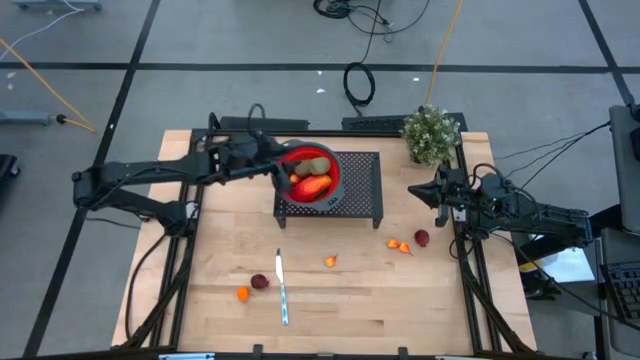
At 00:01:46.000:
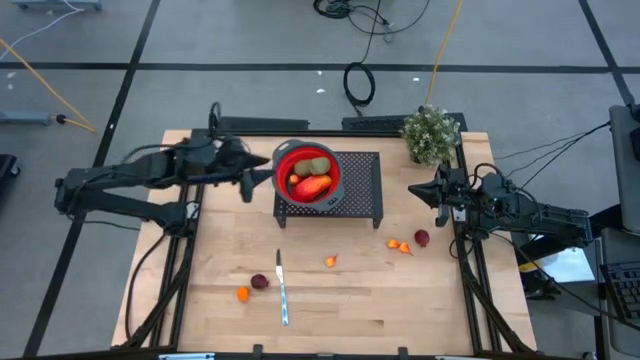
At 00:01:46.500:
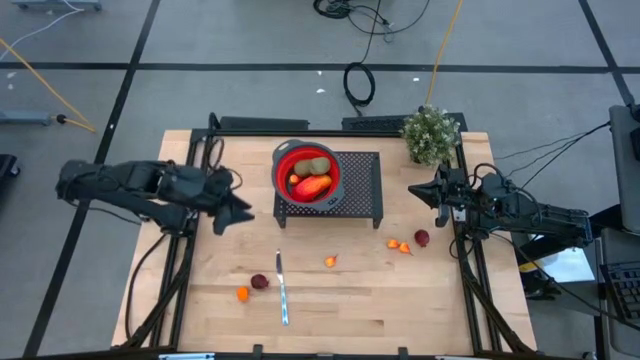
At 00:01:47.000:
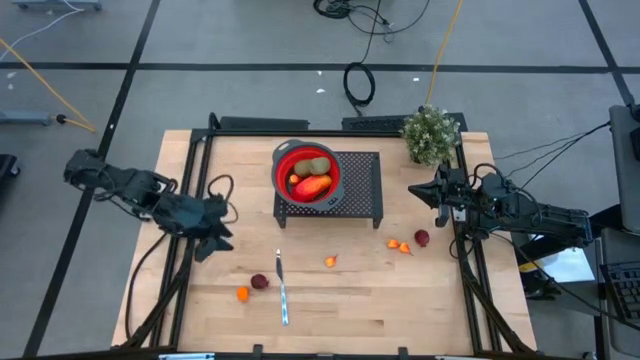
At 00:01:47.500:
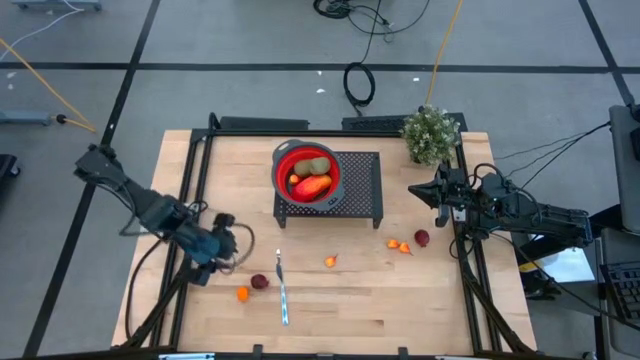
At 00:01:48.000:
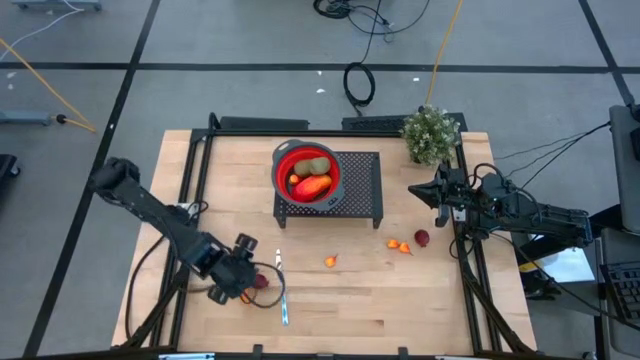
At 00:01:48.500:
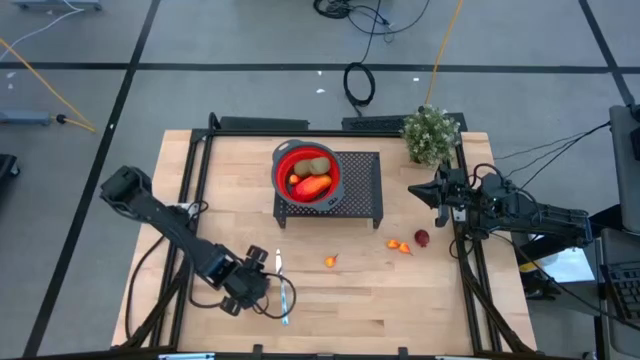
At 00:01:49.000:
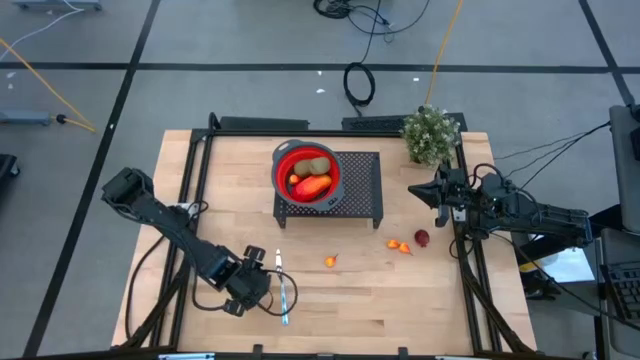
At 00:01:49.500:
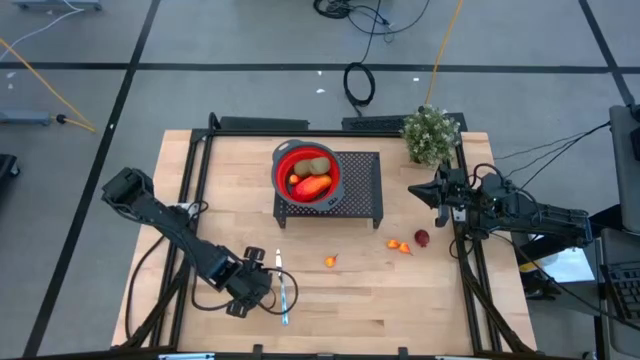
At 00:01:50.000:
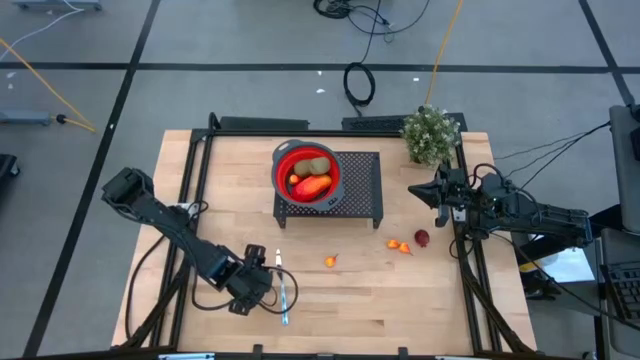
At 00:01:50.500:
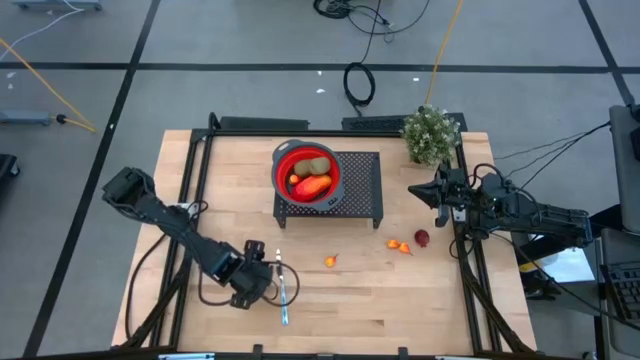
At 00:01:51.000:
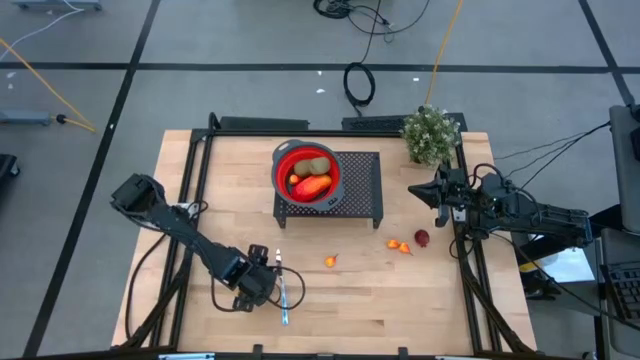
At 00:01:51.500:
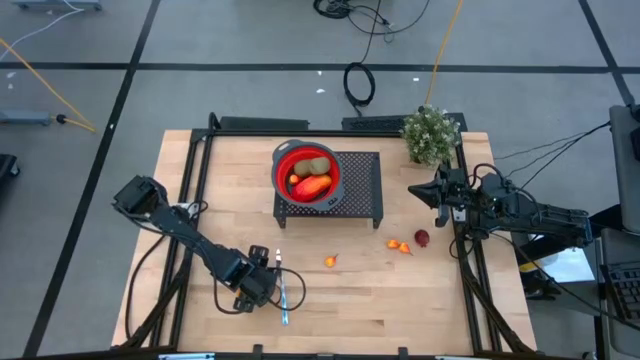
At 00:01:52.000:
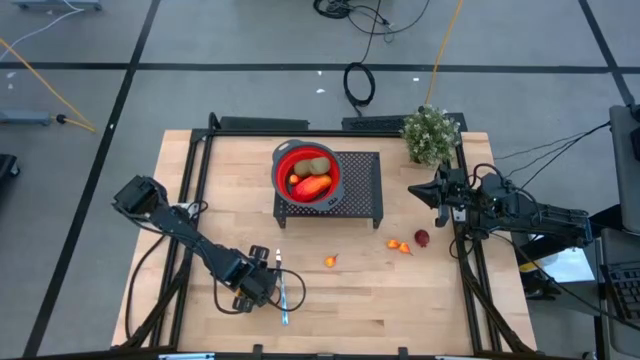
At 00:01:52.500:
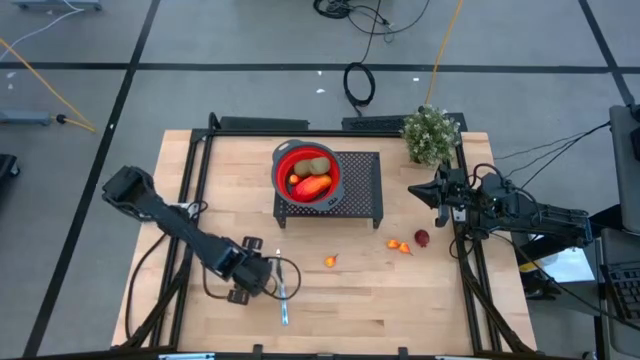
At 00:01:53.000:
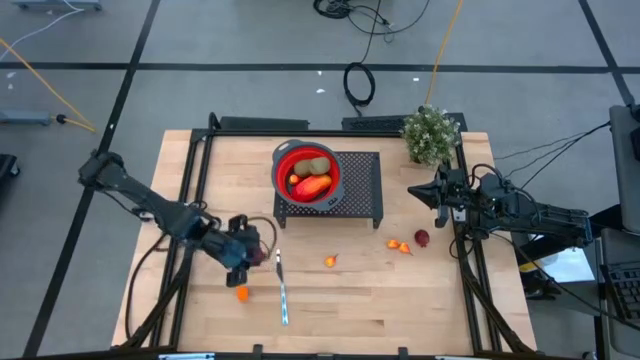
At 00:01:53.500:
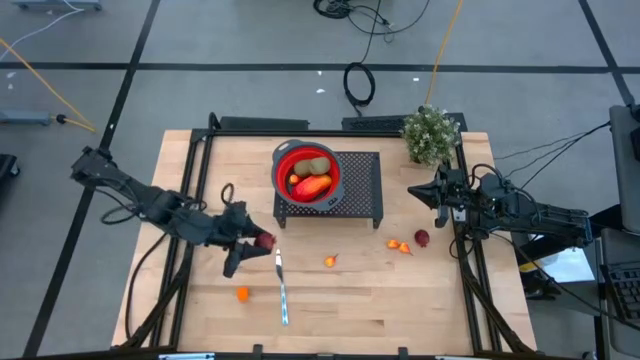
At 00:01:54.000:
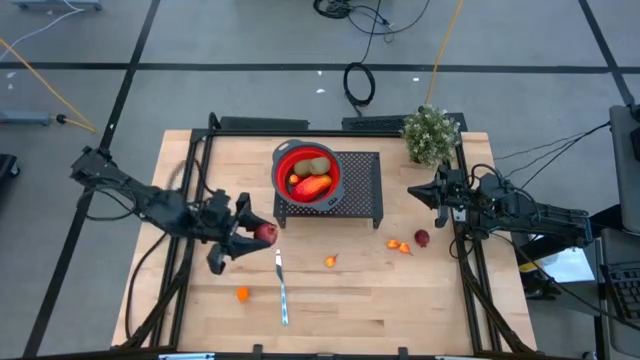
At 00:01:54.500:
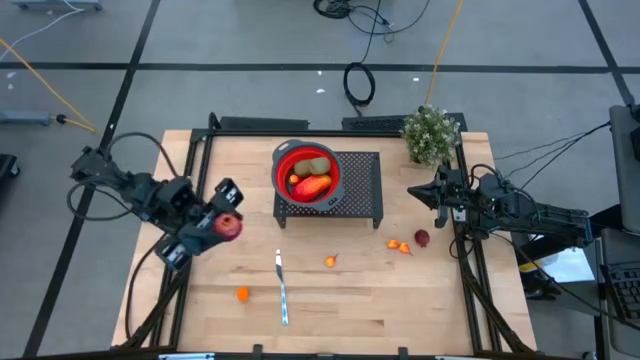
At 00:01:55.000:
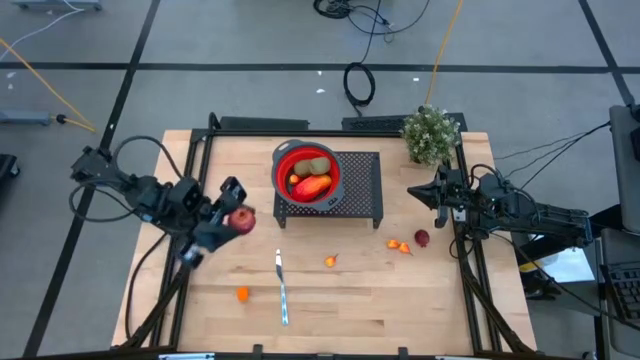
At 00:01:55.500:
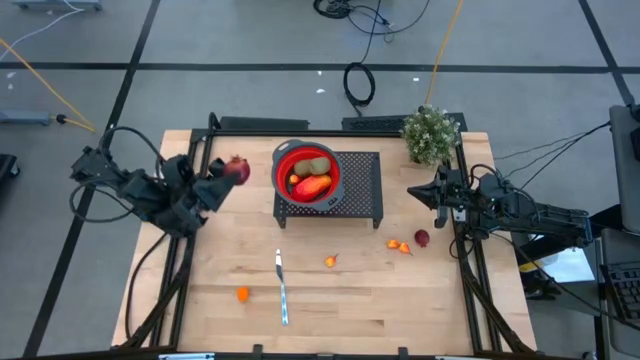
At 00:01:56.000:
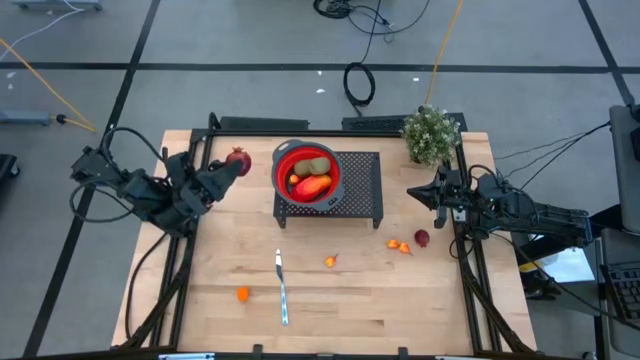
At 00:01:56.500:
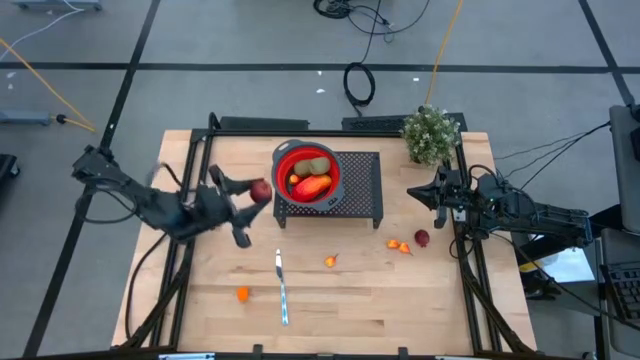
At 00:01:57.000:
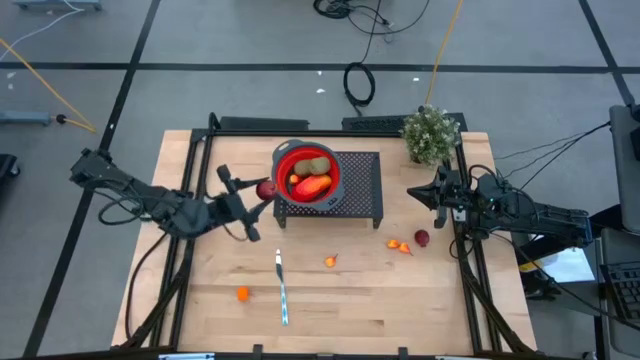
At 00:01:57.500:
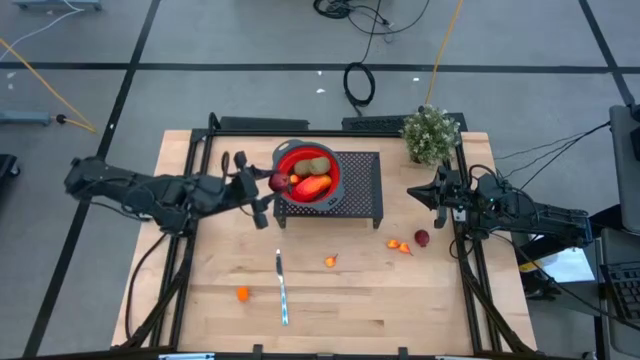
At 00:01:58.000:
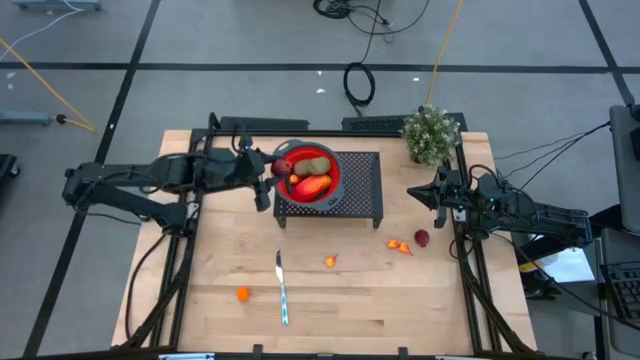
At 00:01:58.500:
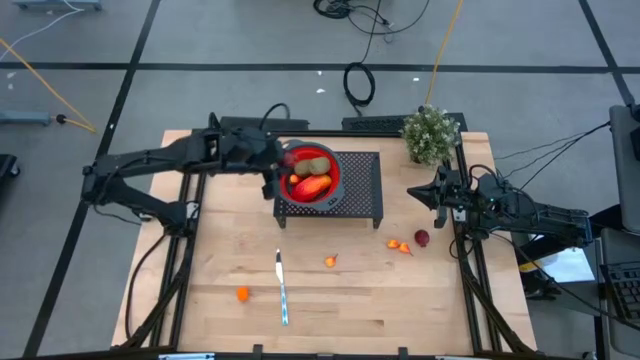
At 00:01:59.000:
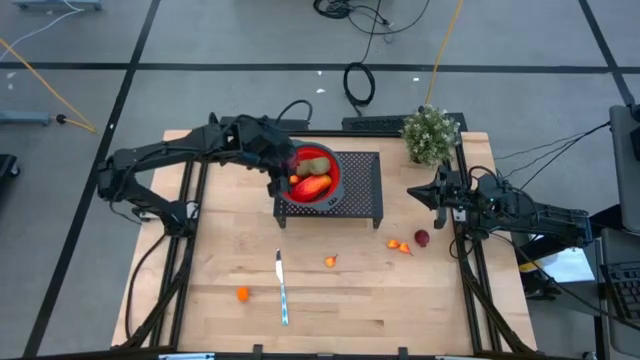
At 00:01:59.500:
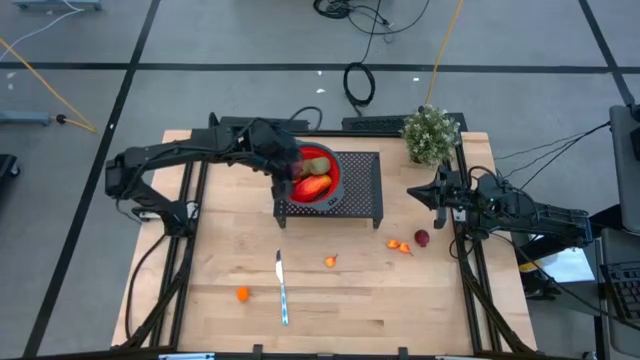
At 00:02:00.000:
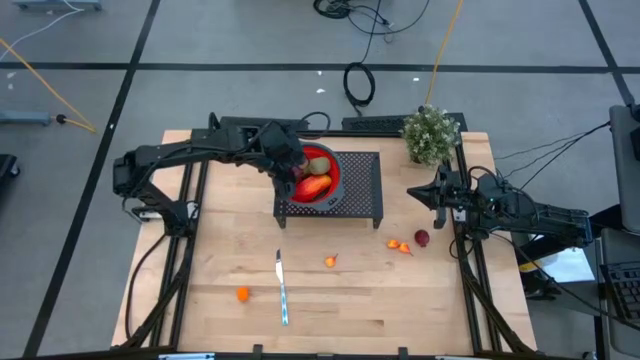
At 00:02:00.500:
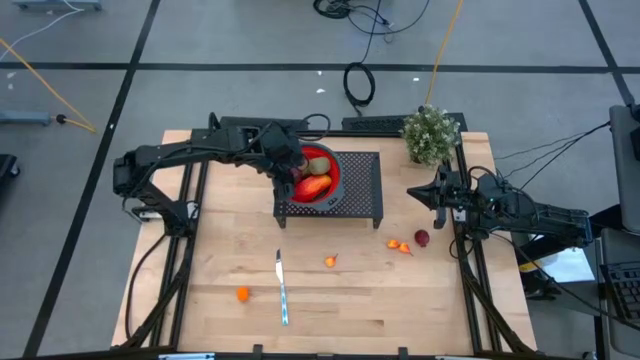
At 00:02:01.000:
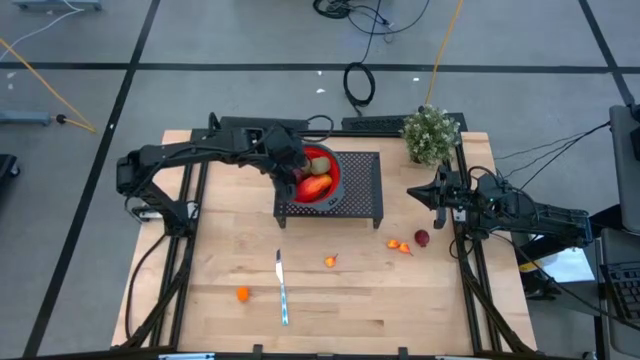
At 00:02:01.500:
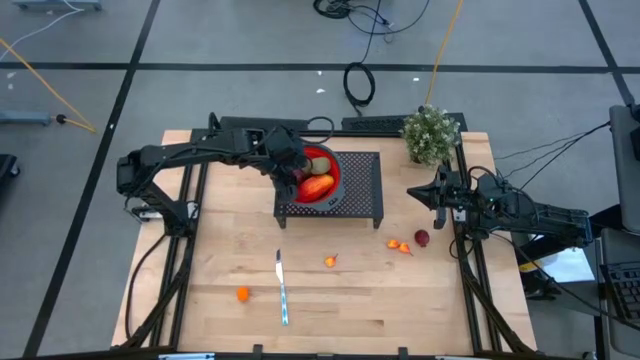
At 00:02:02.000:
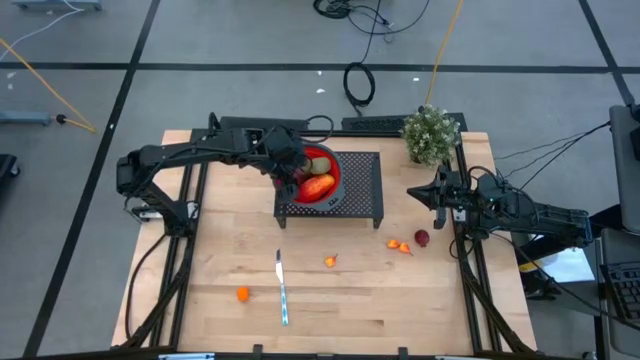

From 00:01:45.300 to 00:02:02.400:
Task: Pick & Place Fruit
Put the bottom left pomegranate into the strainer on the shelf

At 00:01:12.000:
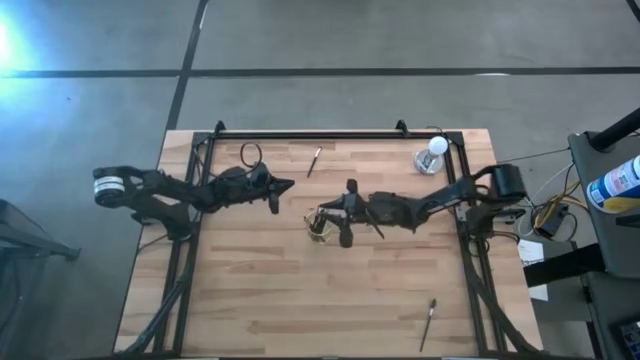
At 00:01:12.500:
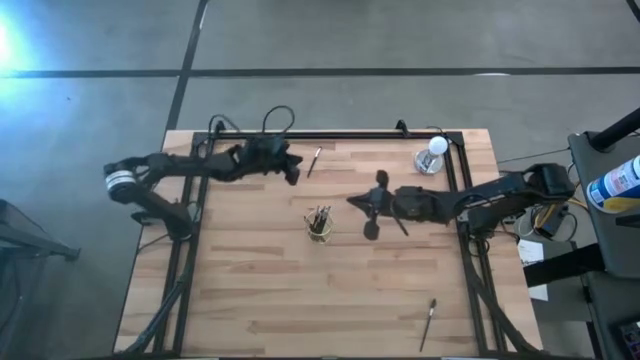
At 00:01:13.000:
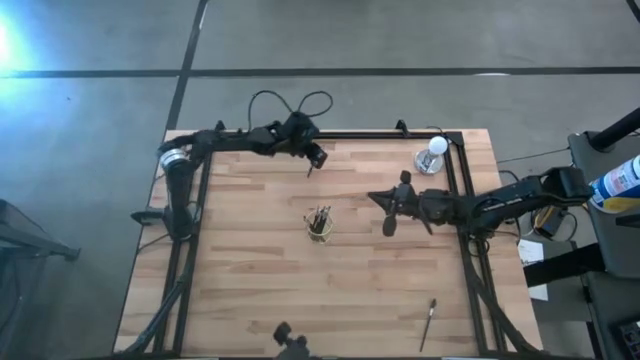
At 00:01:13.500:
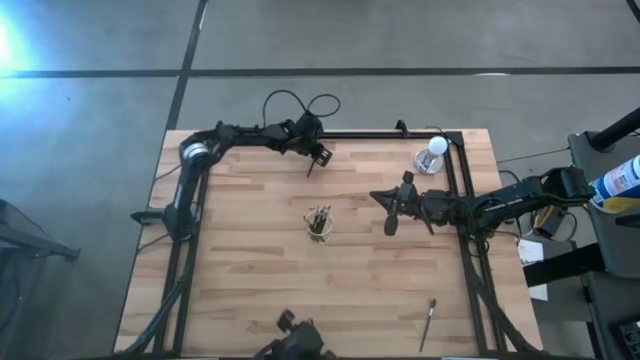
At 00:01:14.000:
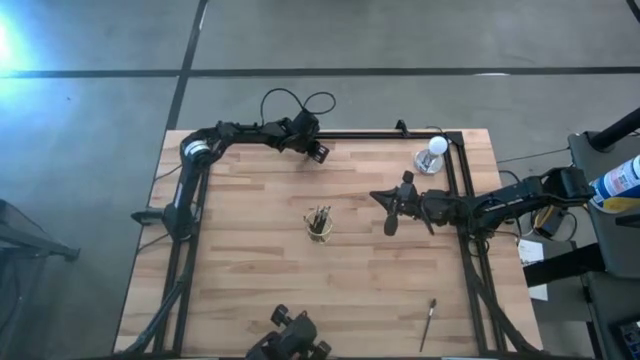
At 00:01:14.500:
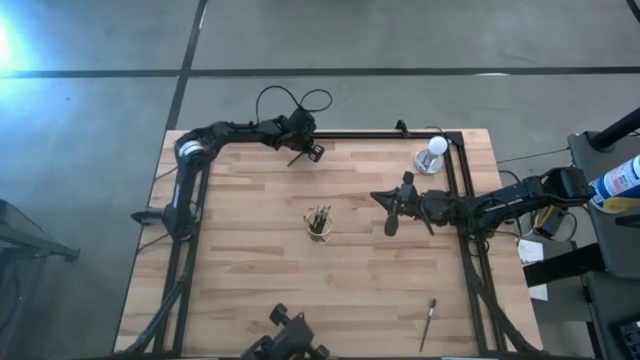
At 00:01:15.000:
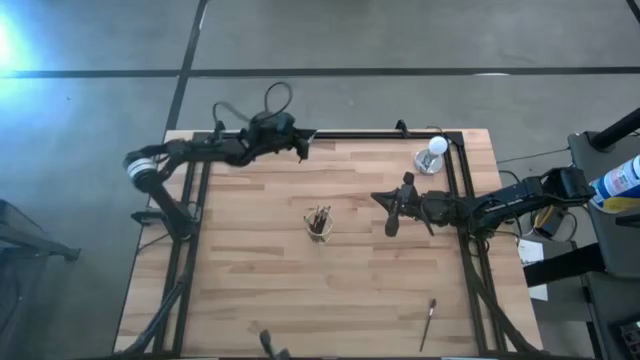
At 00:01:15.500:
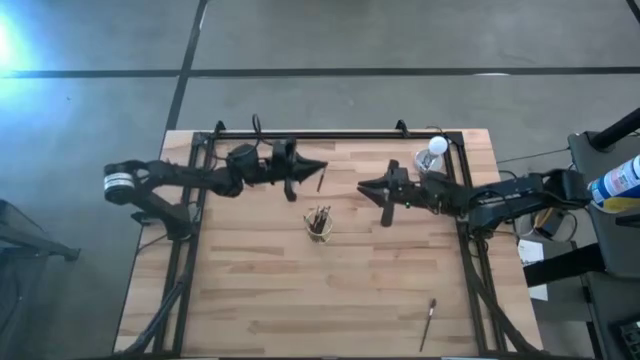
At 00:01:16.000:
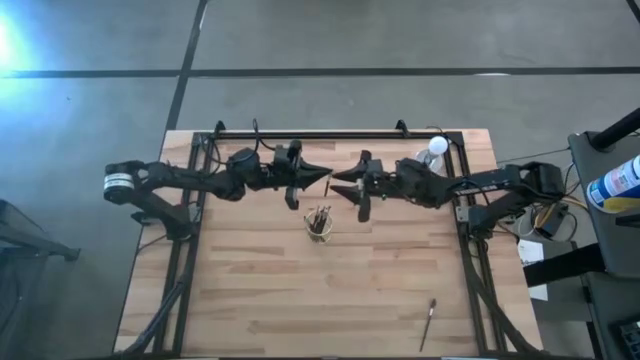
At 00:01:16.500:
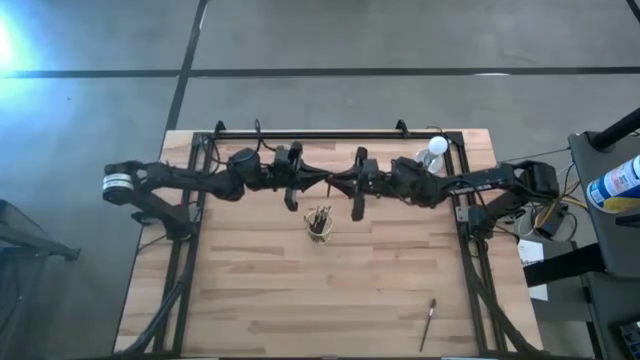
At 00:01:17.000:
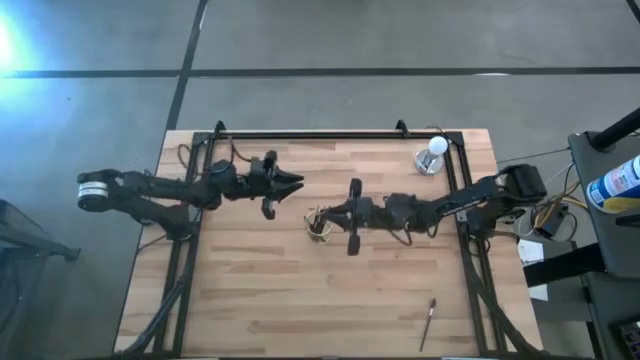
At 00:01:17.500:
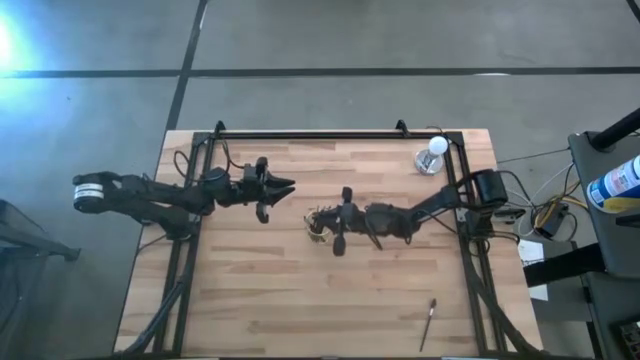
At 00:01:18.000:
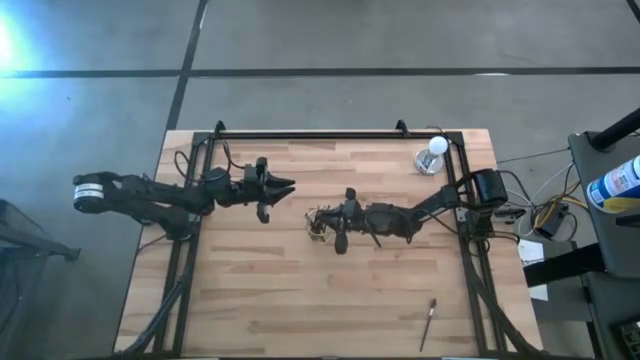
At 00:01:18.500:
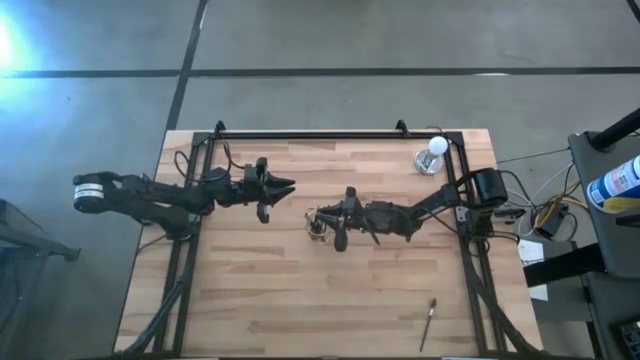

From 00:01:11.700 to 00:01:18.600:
Task: Pick & Place Makeup Brushes
Put the eyeshadow brush into the gold makeup brush holder
